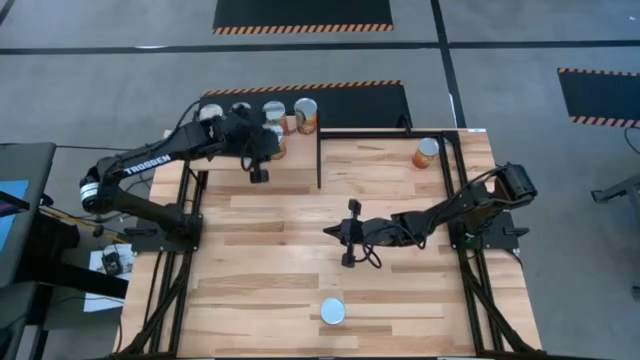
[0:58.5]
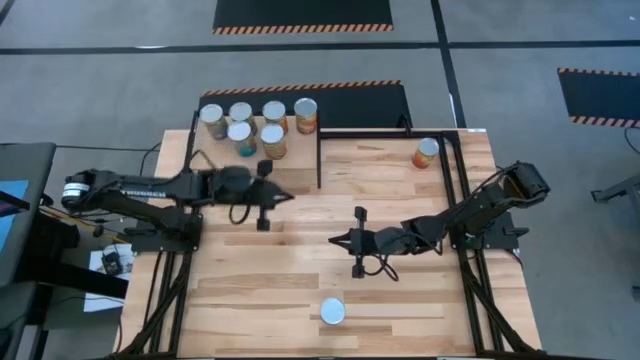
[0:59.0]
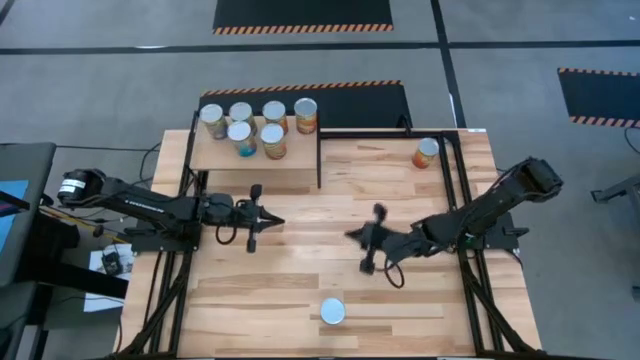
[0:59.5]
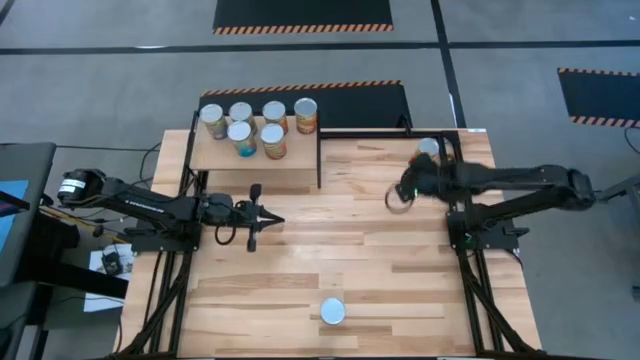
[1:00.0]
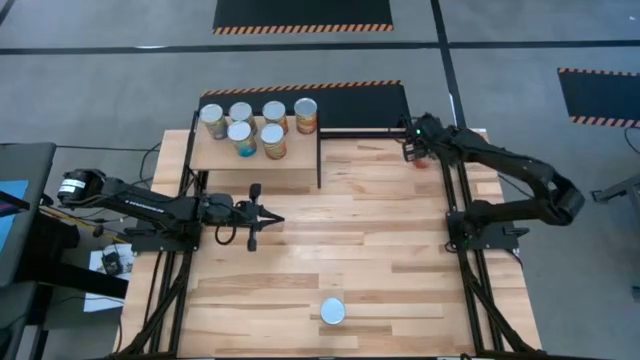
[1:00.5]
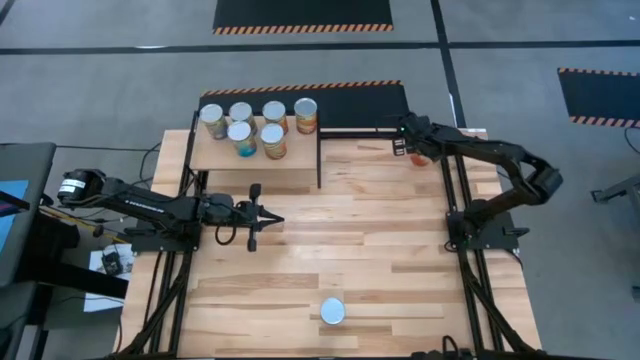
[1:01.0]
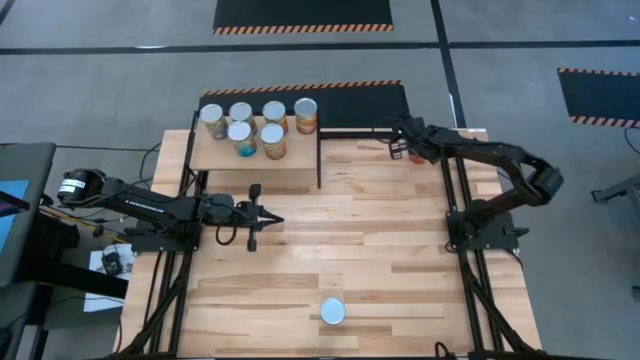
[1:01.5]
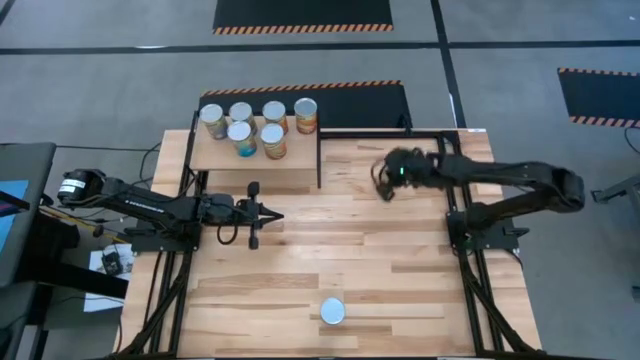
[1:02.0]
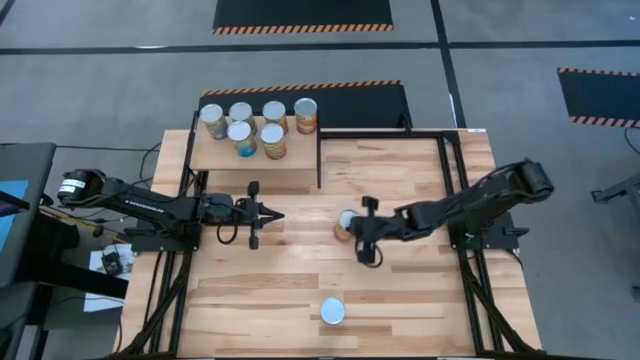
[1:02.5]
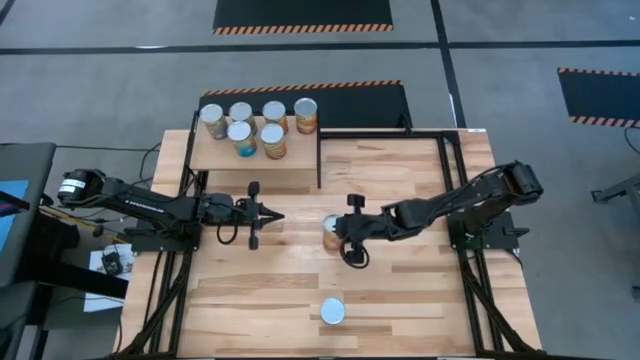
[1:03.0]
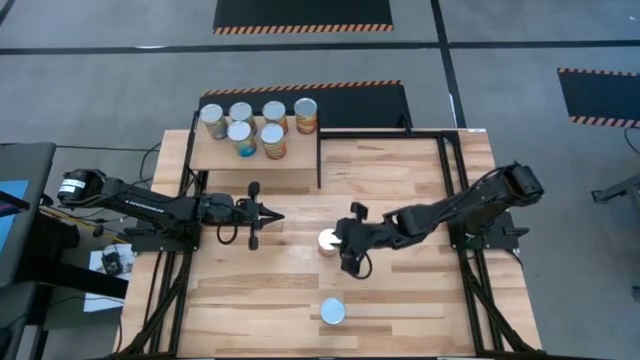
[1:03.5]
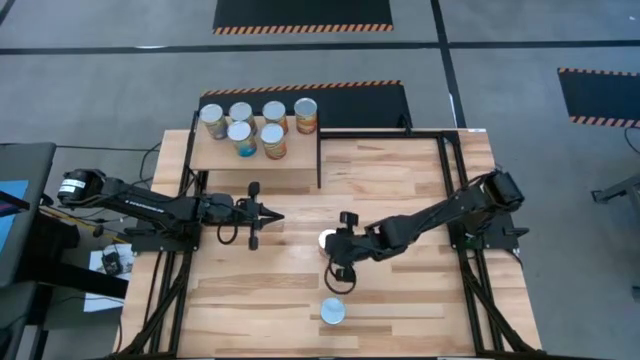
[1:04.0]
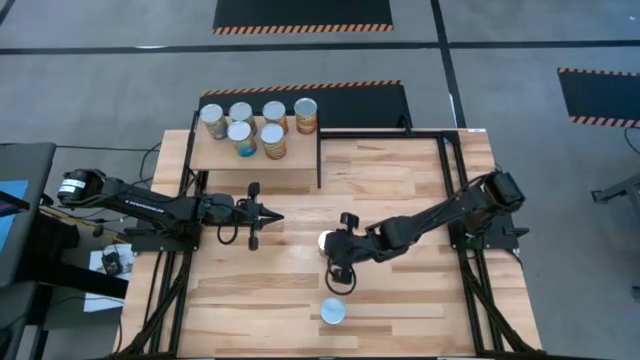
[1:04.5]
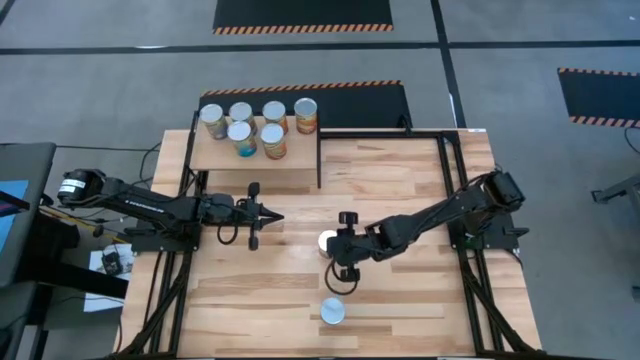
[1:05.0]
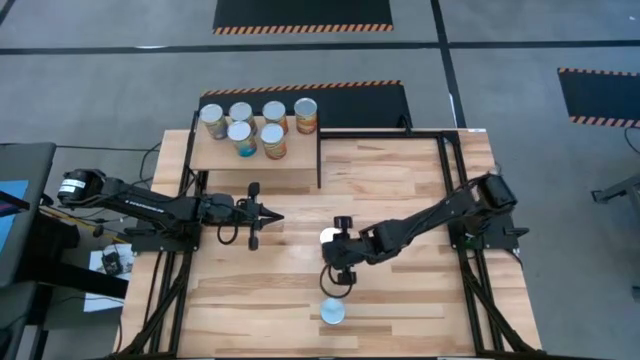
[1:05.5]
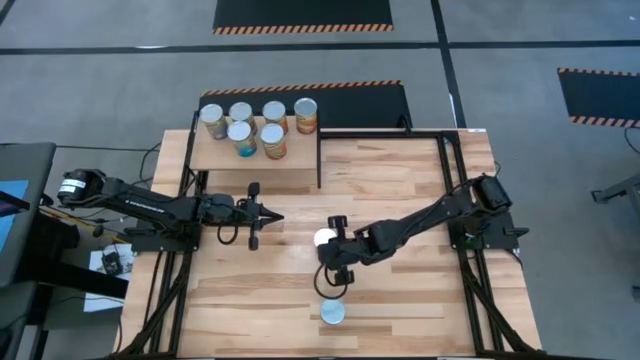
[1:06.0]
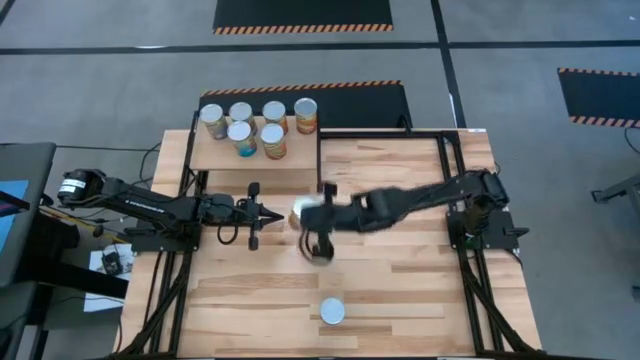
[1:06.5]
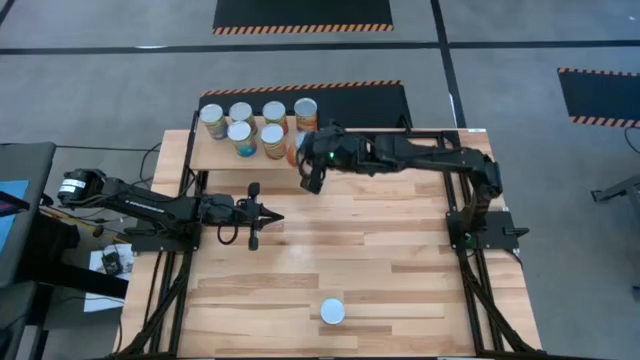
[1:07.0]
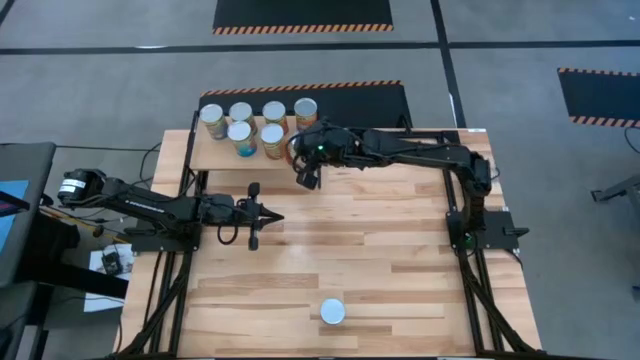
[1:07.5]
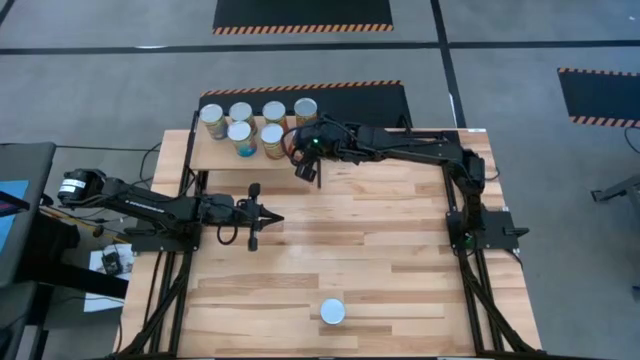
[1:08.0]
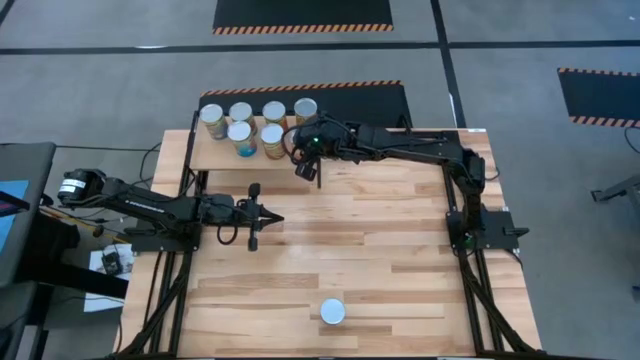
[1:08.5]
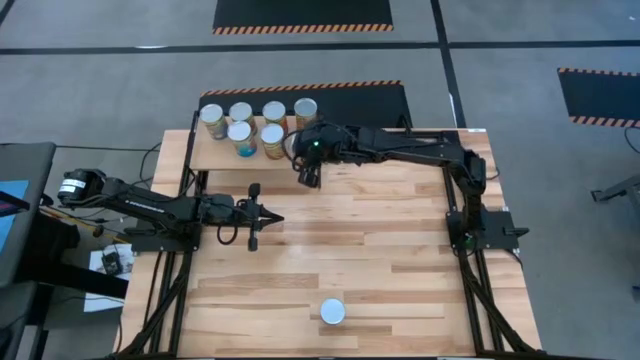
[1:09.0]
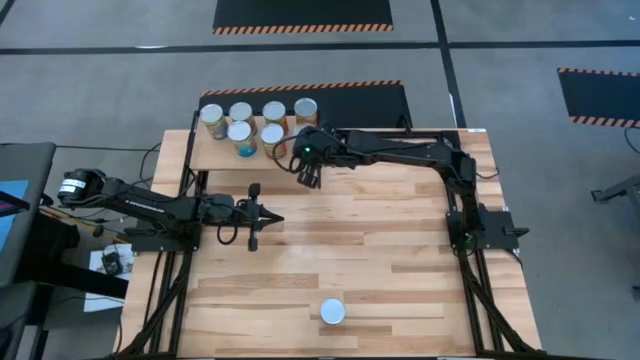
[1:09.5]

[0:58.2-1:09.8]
Task: Pick and place cans onto a shelf
Put the canned corn on the shelf aligned with the other canned corn

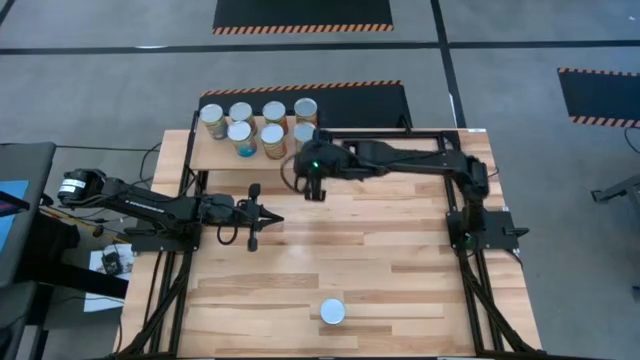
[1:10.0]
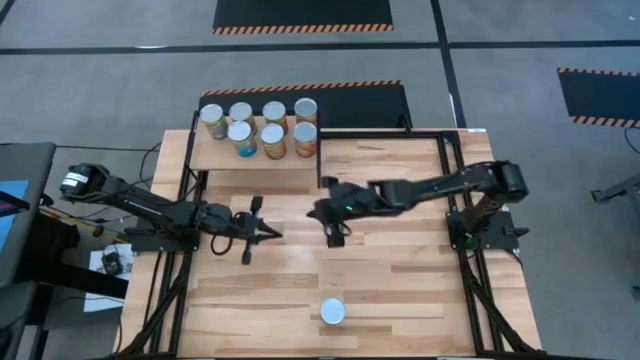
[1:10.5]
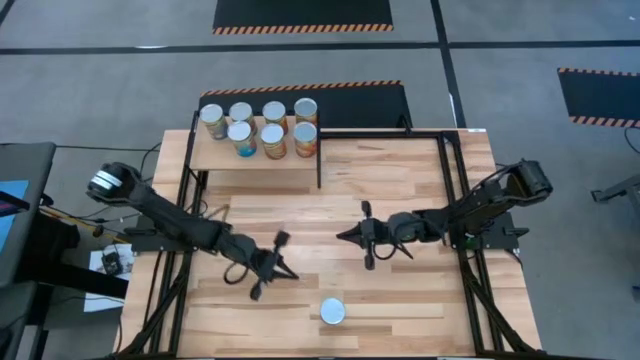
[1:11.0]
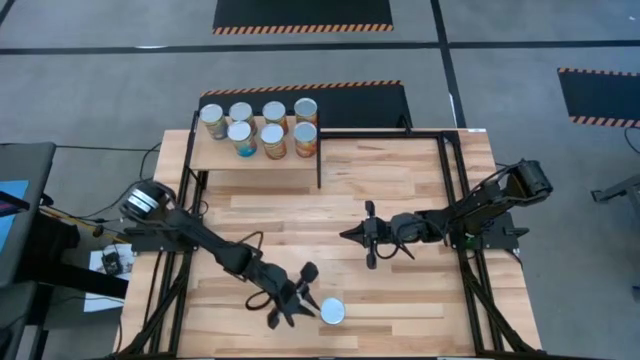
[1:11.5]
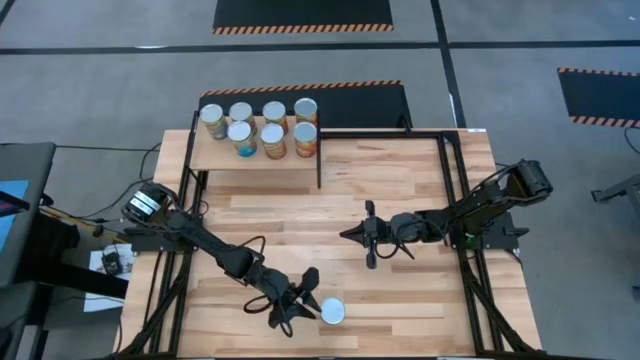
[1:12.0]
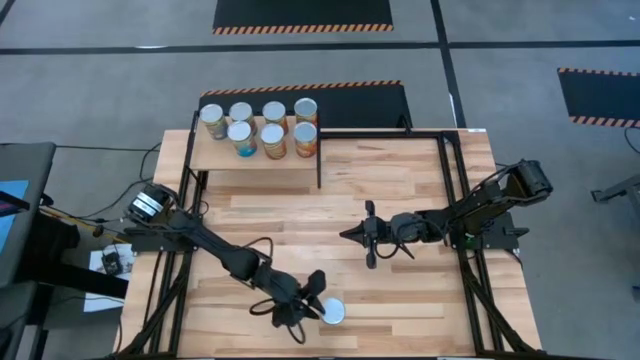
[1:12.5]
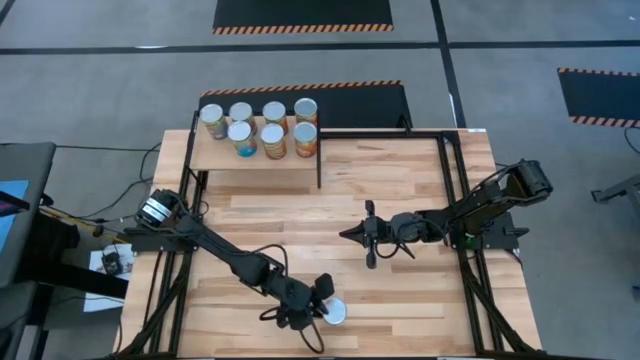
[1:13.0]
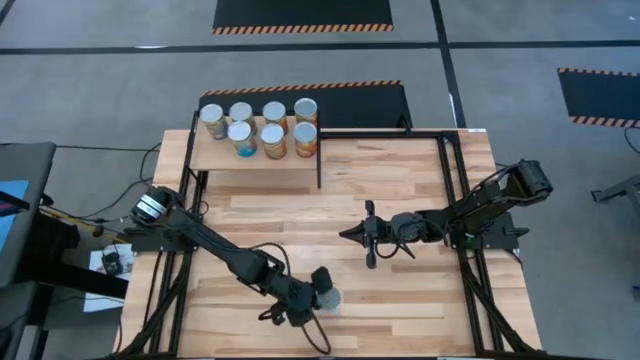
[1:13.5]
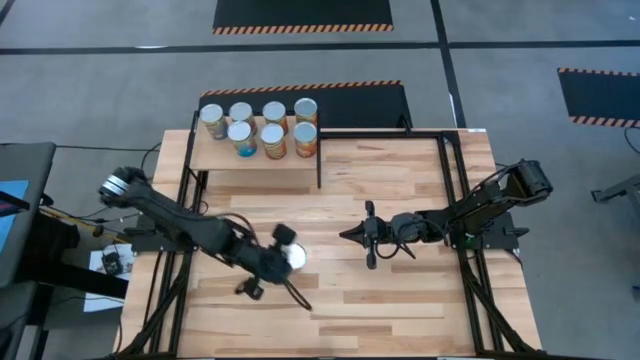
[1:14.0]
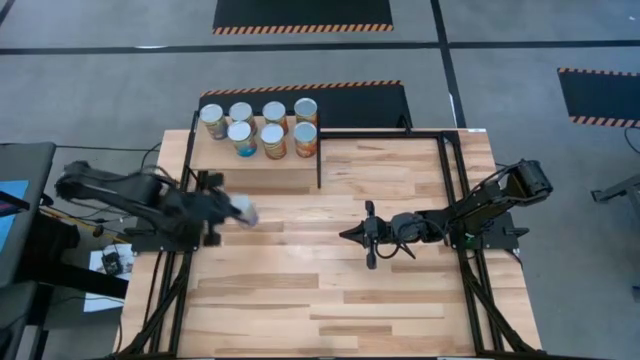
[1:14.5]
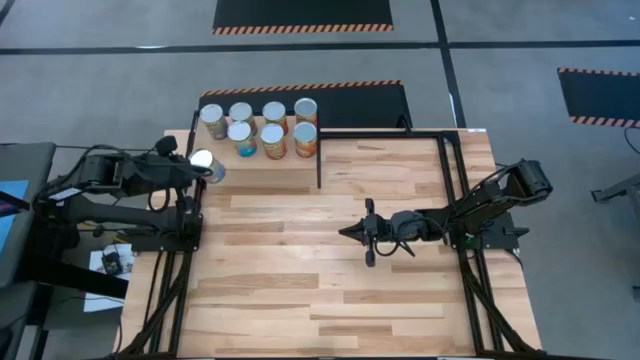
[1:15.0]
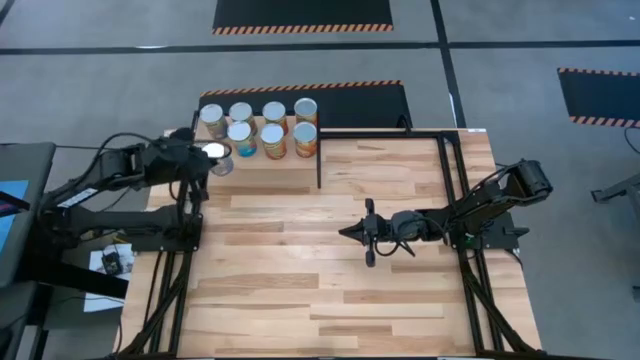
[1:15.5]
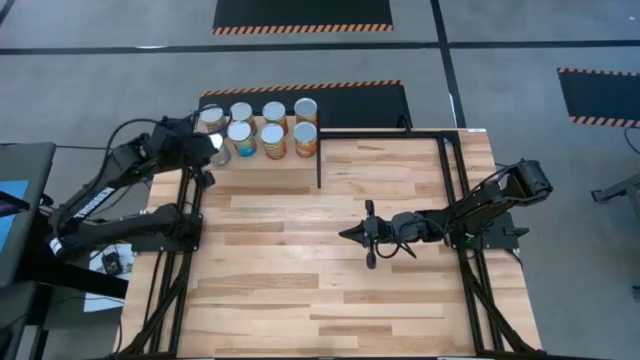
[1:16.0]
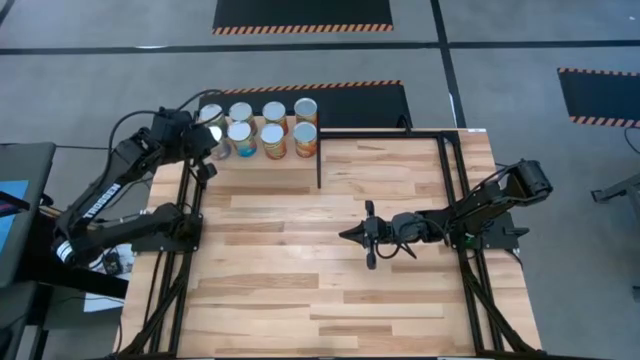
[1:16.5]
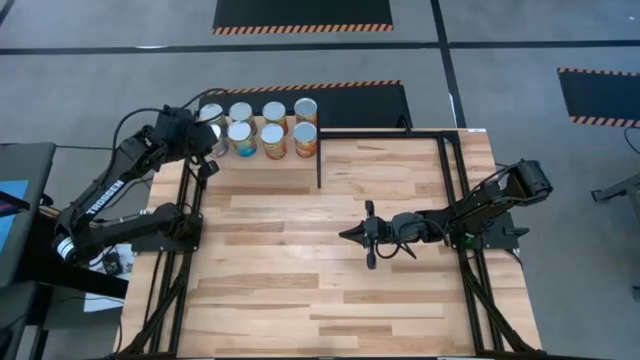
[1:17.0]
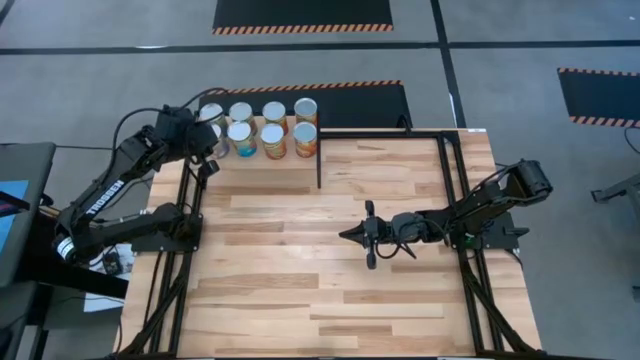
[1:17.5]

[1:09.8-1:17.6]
Put the canned peaches on the shelf aligned with the other canned peaches

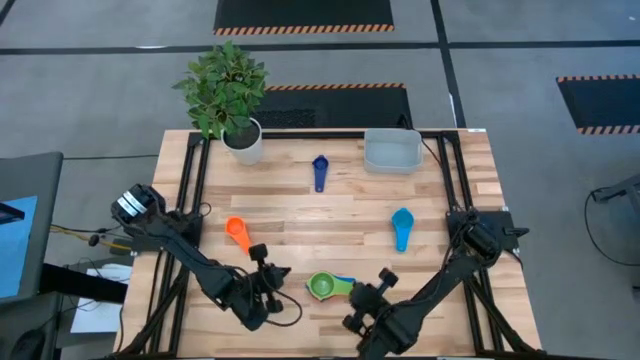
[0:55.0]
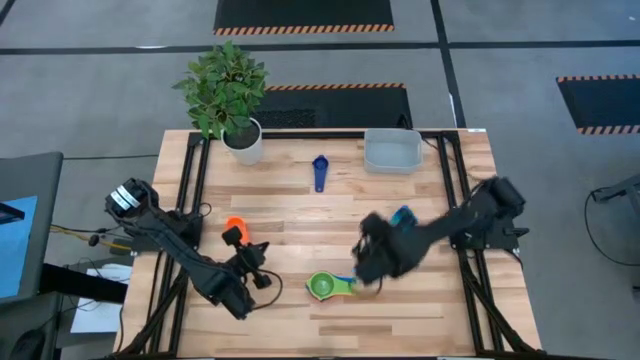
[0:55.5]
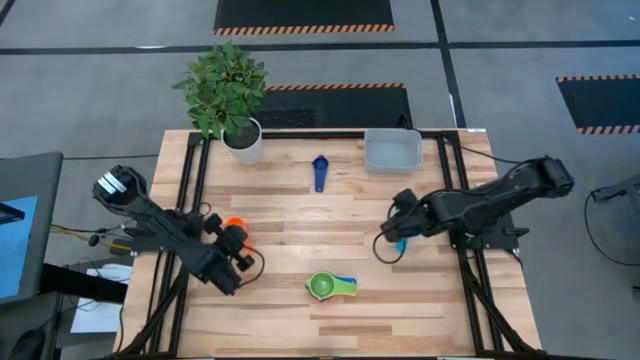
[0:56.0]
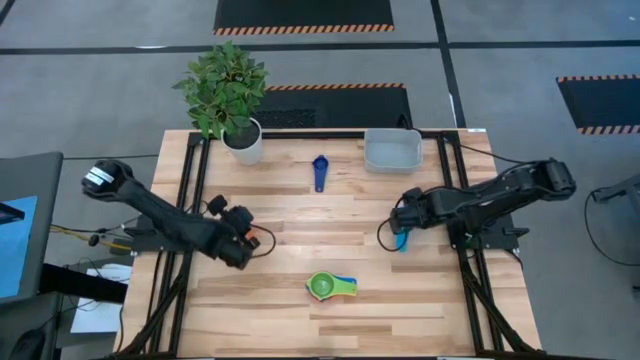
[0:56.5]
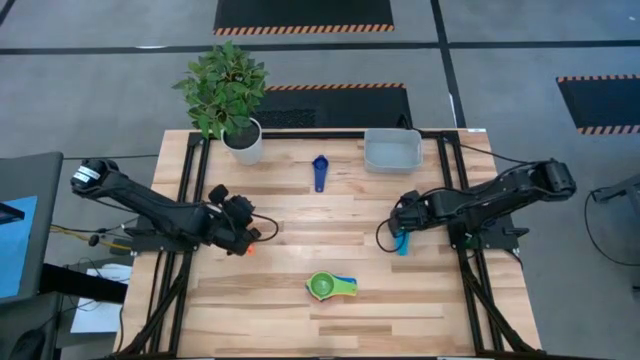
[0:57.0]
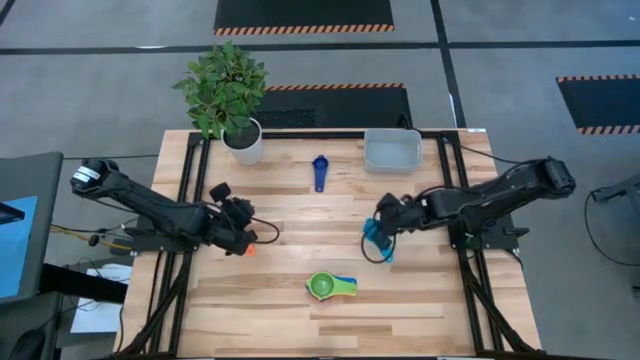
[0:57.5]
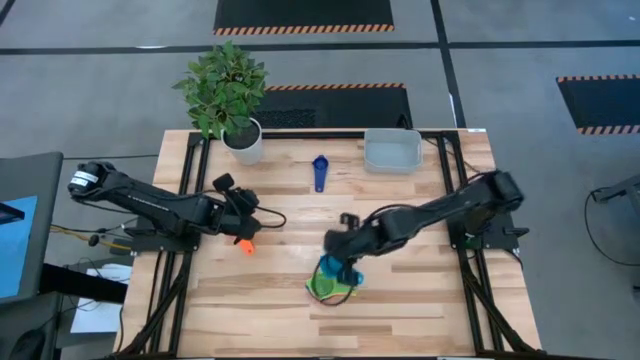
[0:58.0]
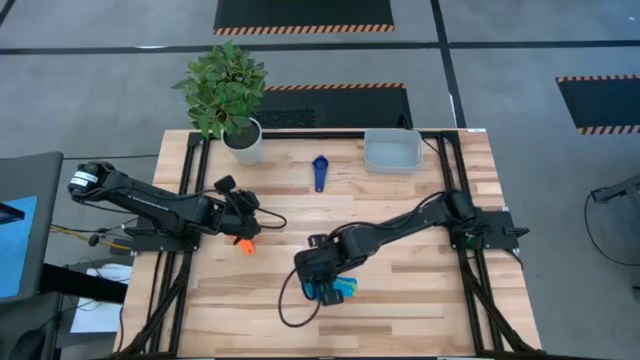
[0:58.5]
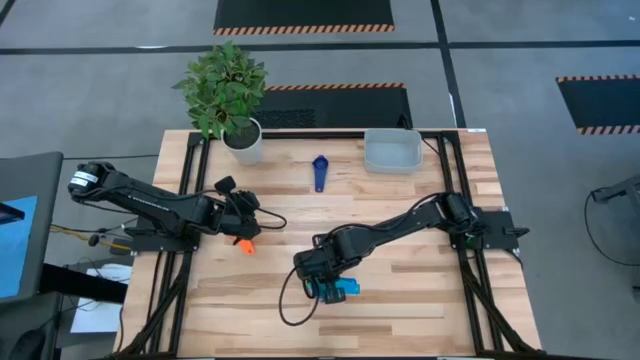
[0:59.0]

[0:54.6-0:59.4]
Task: Nest measuring cups in basket
Stack the light blue measuring cup on top of the green measuring cup
